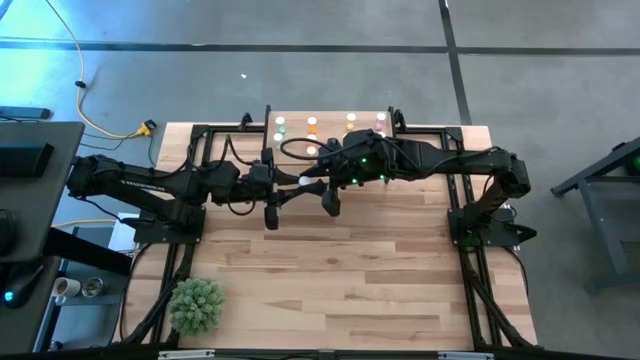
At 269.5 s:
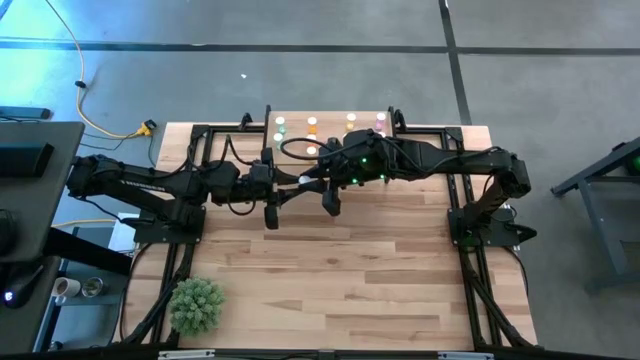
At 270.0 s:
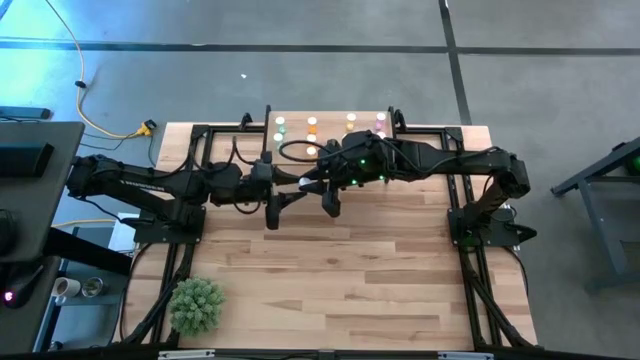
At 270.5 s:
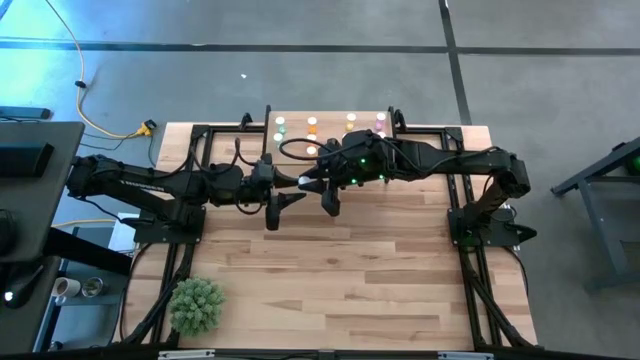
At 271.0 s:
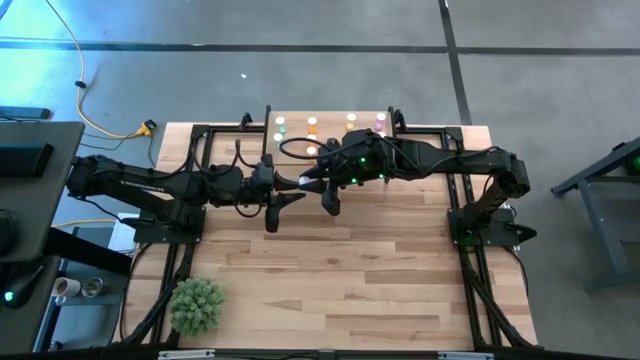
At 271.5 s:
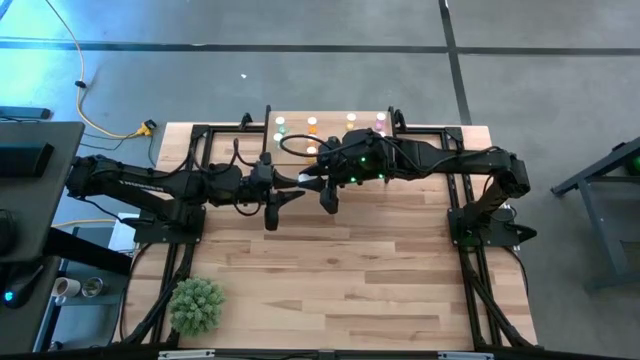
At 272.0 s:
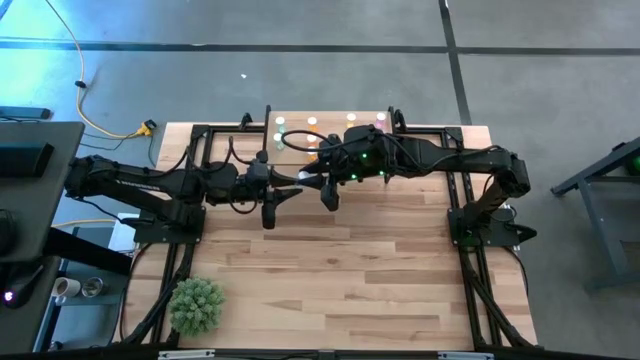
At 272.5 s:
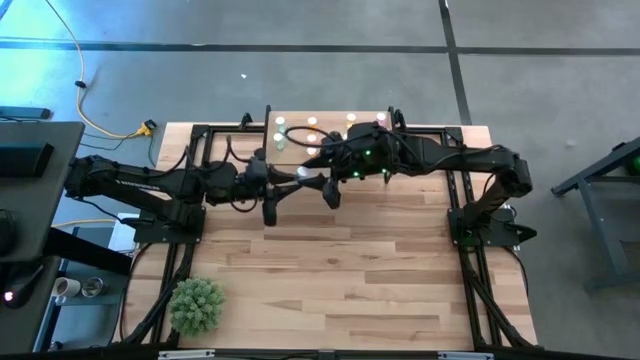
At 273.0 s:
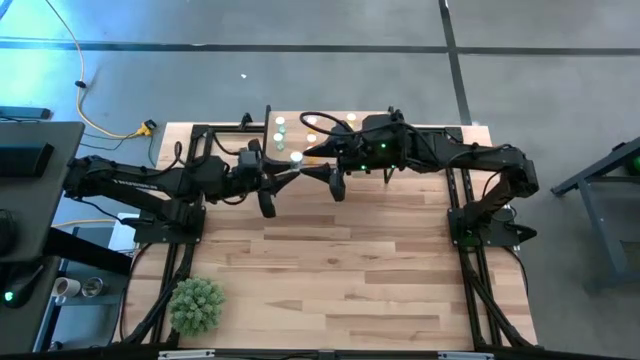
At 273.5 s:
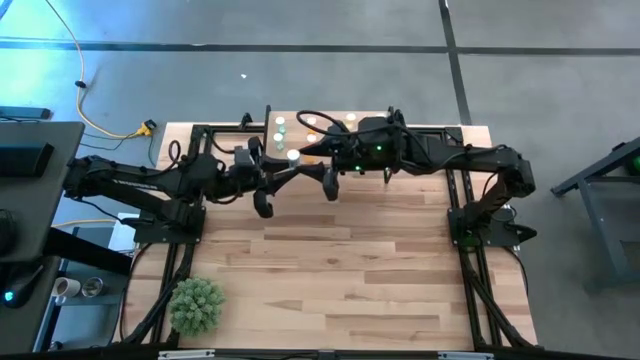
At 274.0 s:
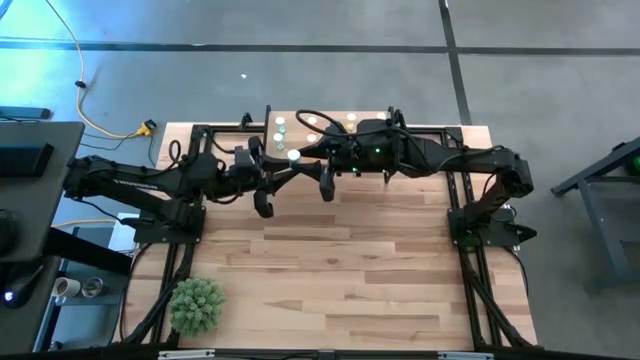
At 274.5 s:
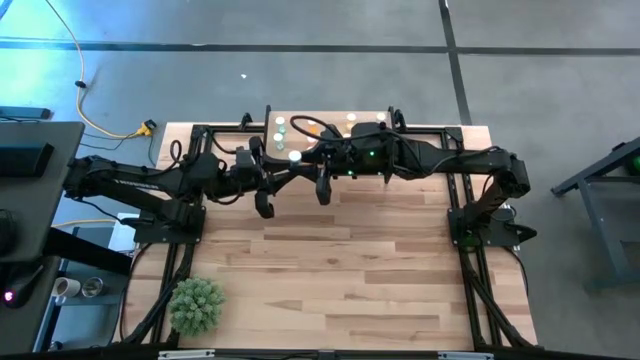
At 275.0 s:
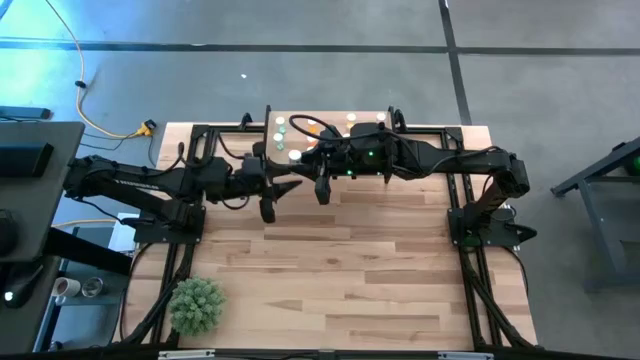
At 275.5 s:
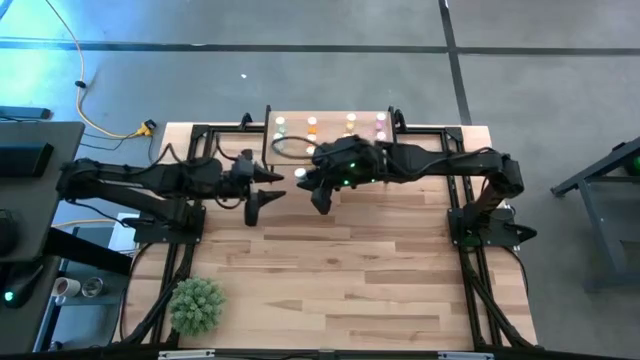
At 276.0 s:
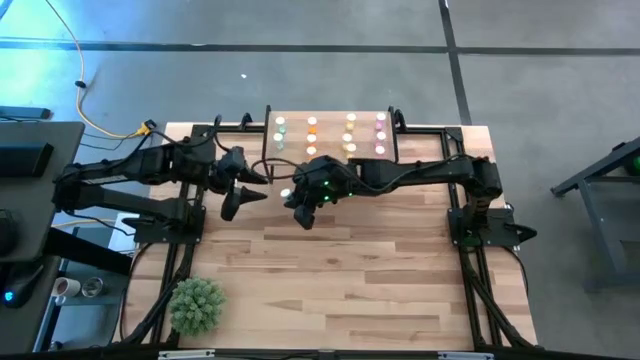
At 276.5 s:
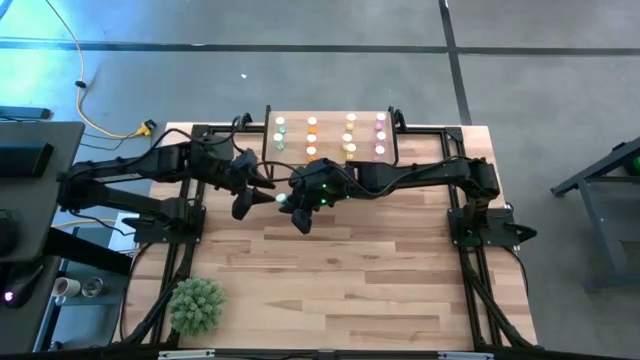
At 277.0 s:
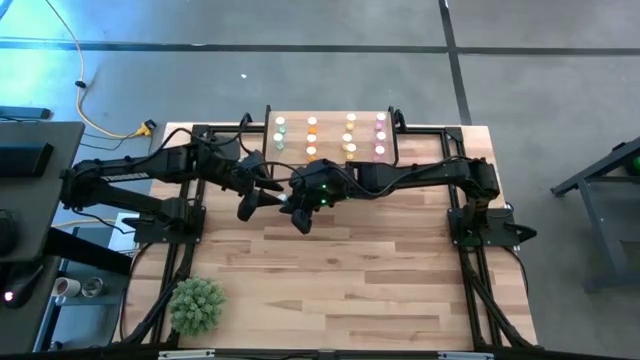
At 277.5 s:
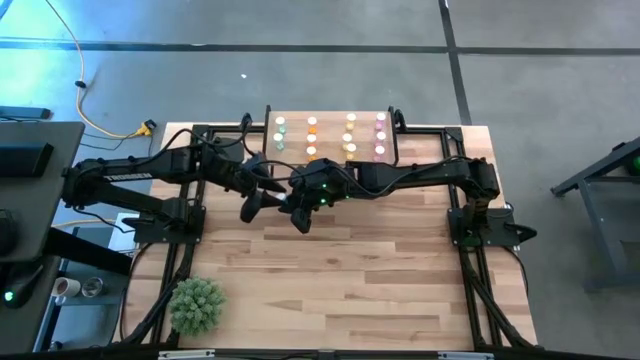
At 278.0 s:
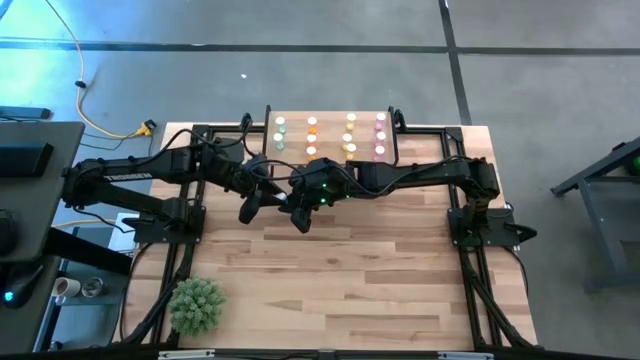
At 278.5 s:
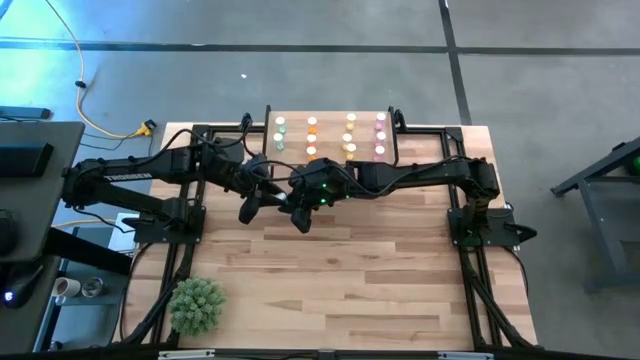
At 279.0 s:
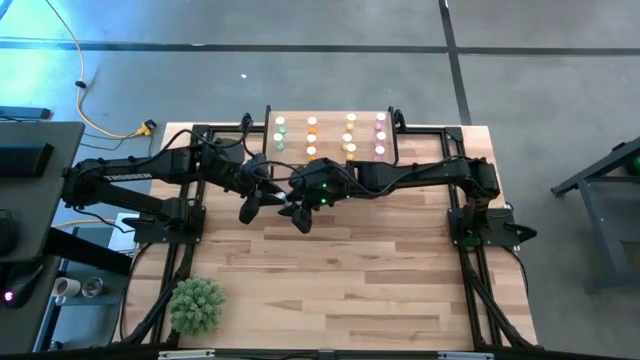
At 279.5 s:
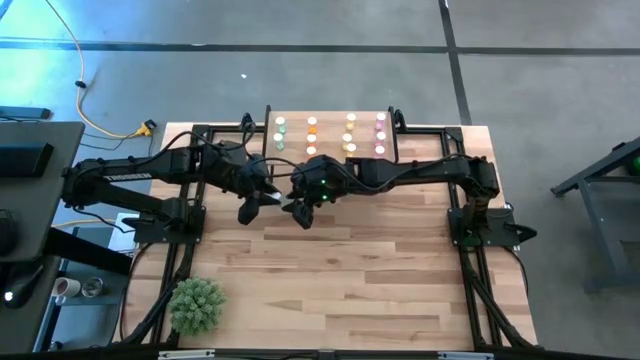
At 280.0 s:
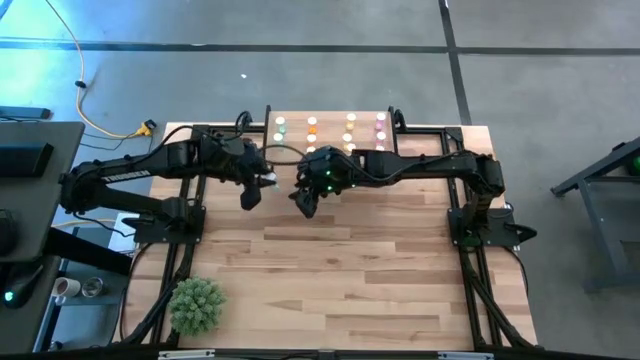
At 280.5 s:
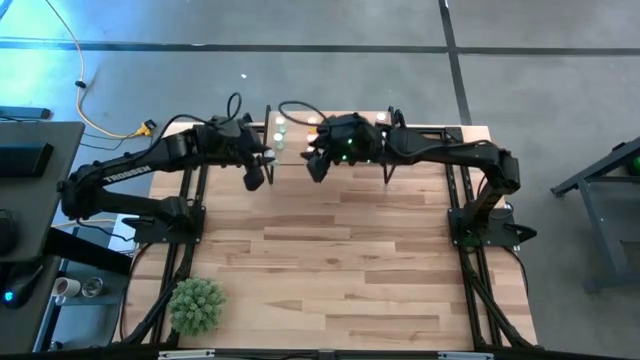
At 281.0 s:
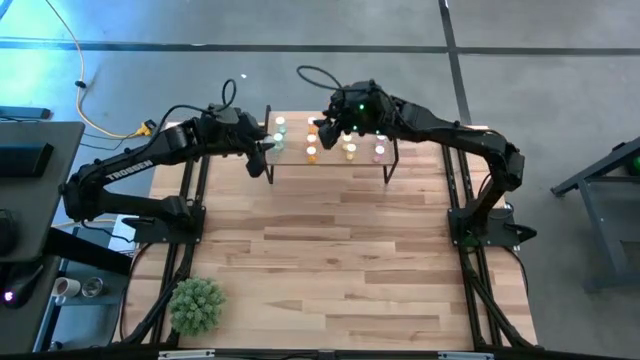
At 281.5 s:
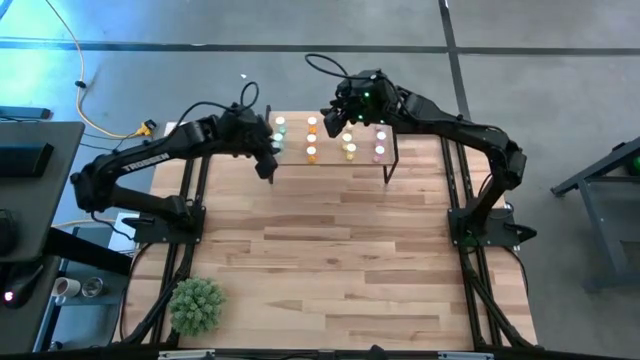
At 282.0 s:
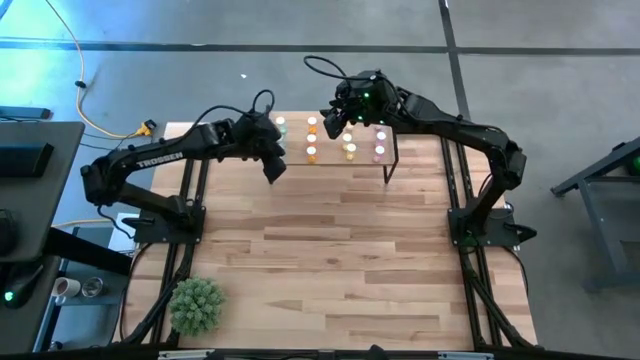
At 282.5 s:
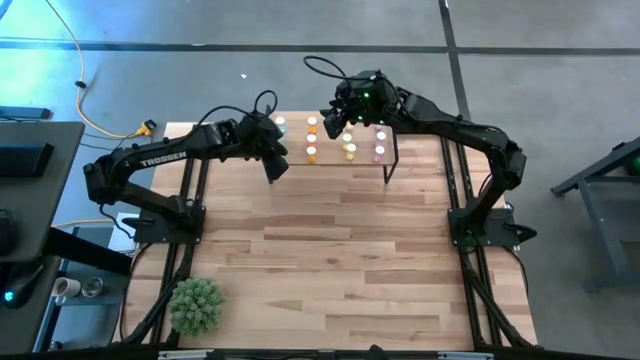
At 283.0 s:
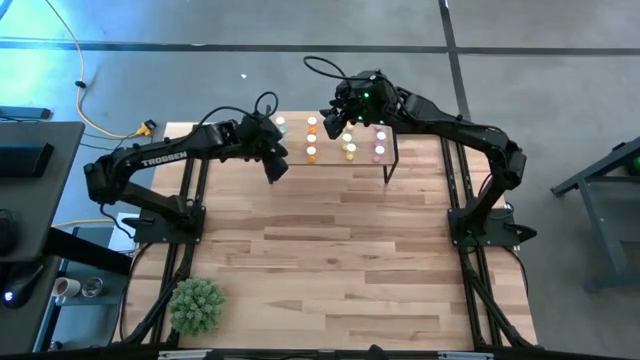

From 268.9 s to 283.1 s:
Task: Pick and place medicine bottles onto shelf by color
Put the blue pill bottle on the shelf aligned with the other blue pill bottles

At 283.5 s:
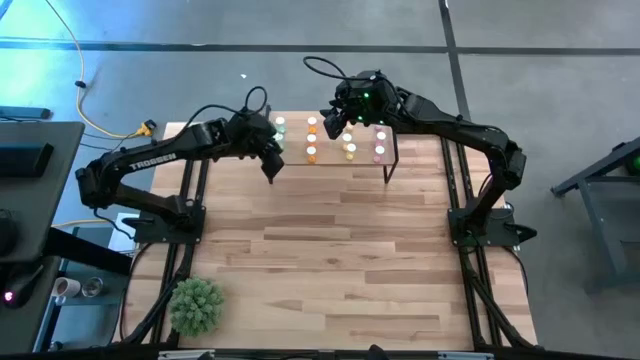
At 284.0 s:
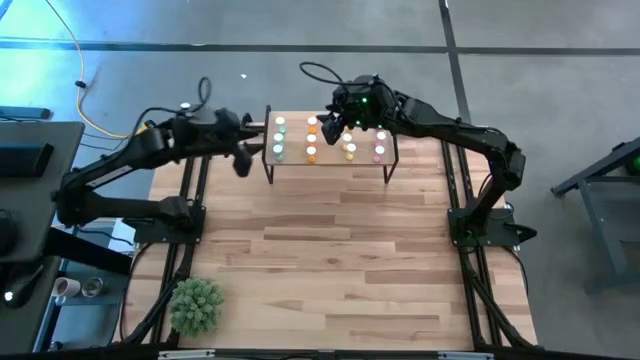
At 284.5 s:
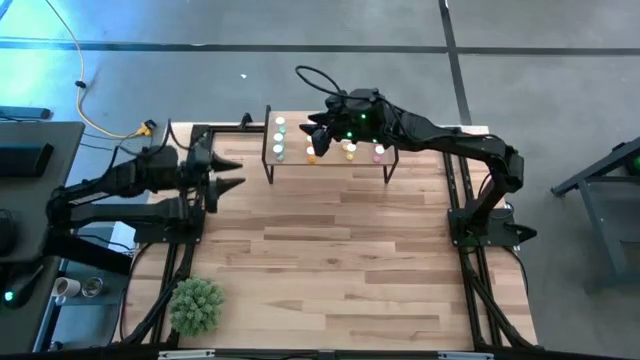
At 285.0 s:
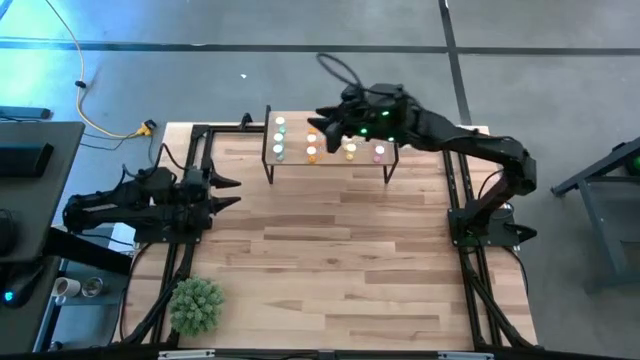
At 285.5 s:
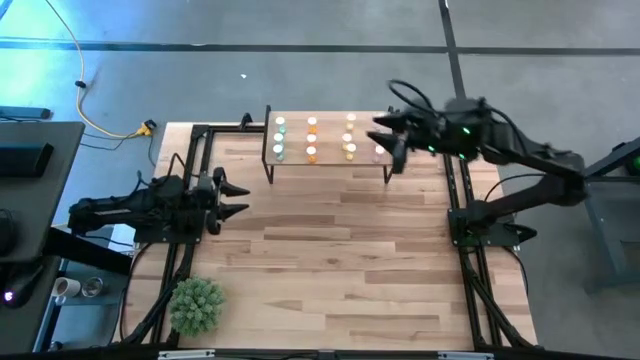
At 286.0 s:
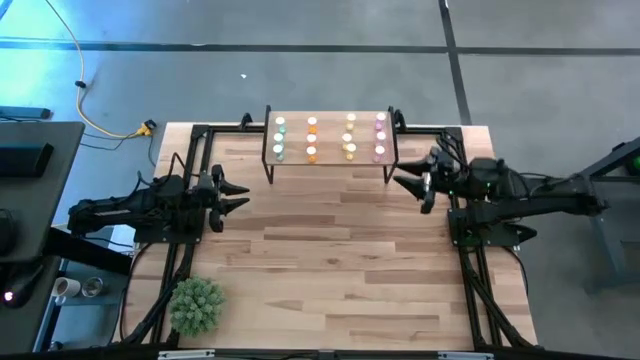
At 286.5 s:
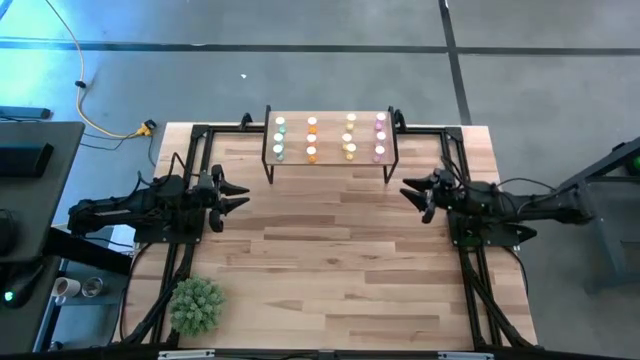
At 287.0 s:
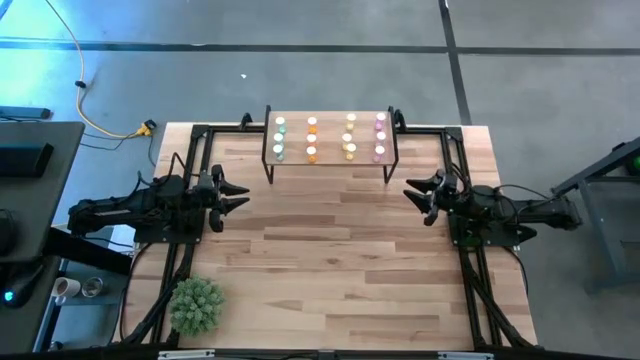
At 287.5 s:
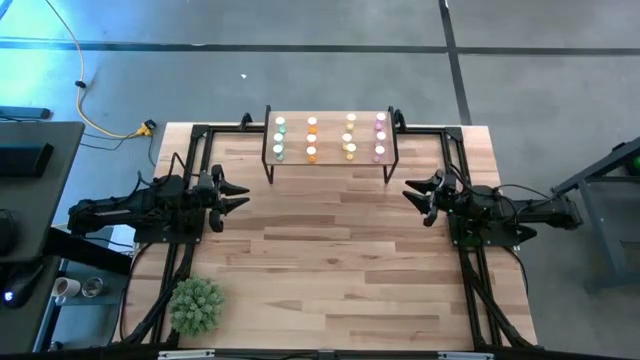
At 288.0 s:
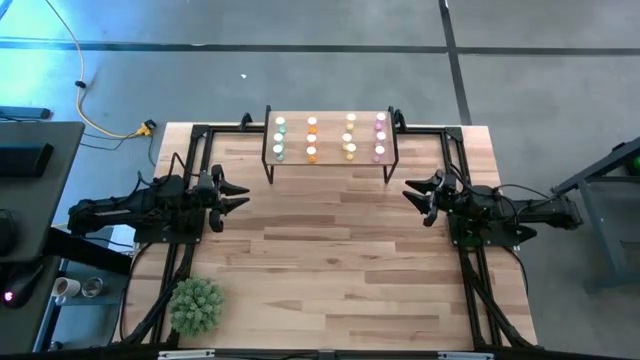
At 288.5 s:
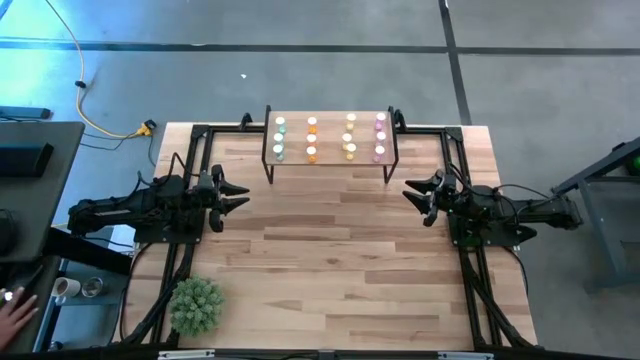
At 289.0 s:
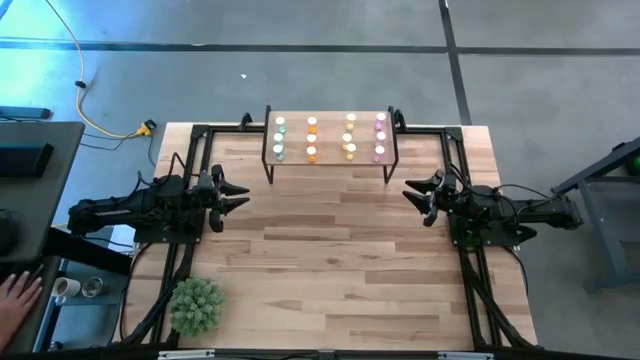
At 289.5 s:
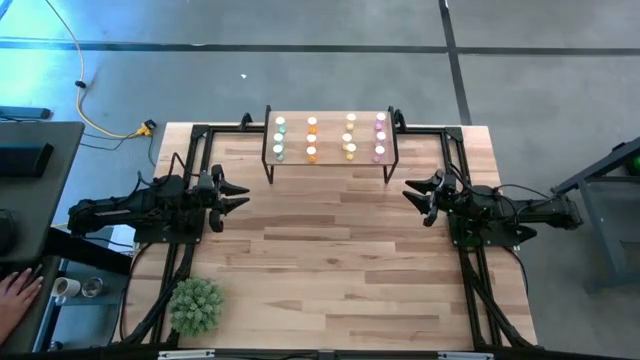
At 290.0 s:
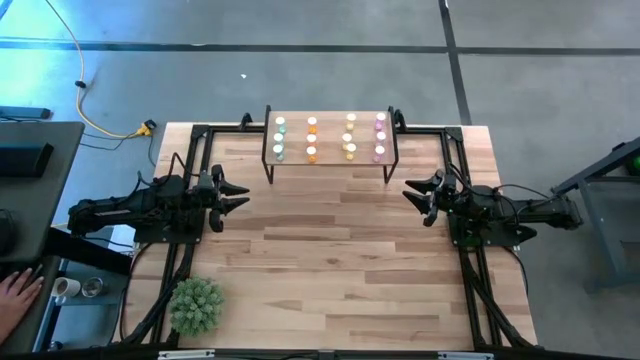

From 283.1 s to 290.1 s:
Return to Home Position
